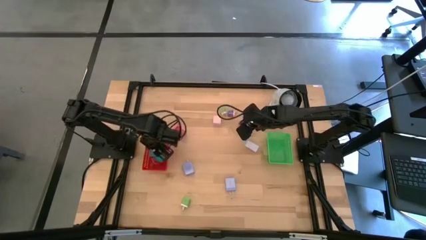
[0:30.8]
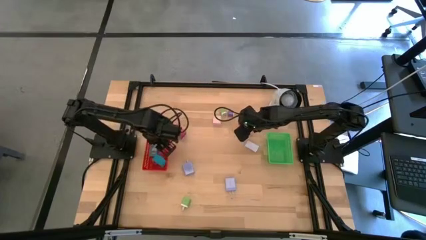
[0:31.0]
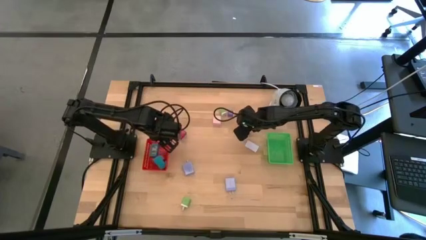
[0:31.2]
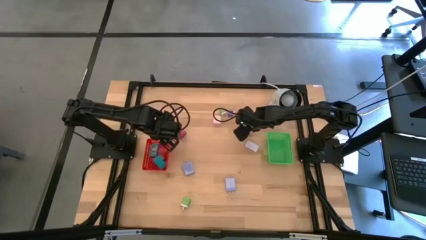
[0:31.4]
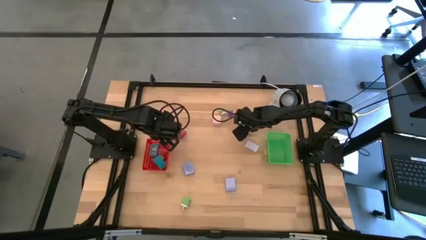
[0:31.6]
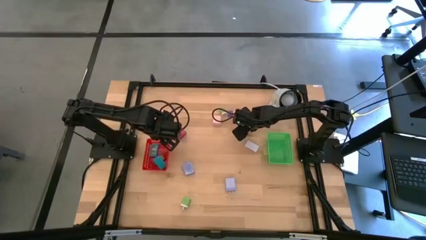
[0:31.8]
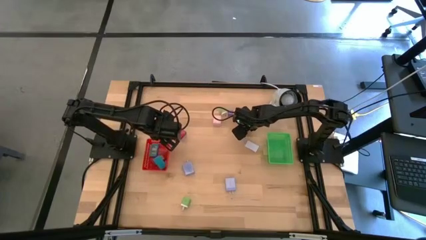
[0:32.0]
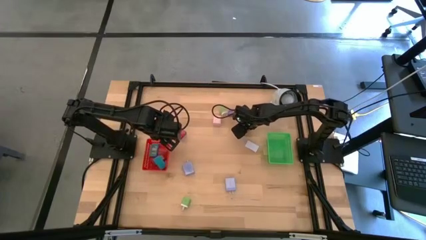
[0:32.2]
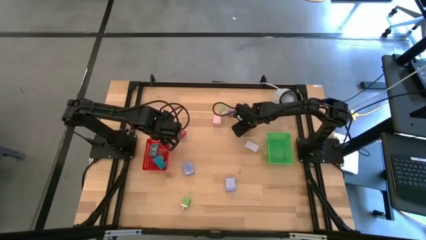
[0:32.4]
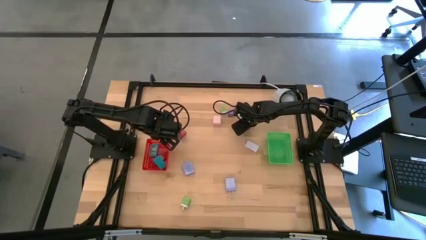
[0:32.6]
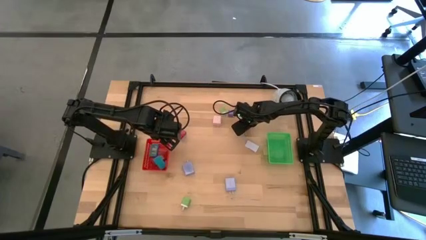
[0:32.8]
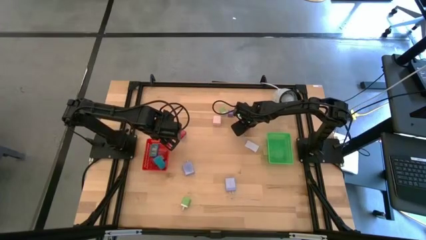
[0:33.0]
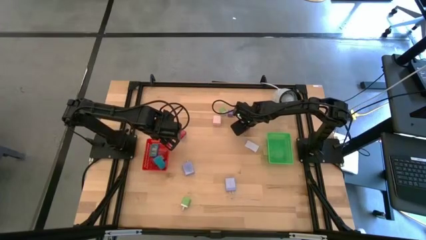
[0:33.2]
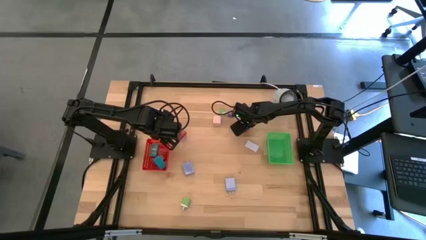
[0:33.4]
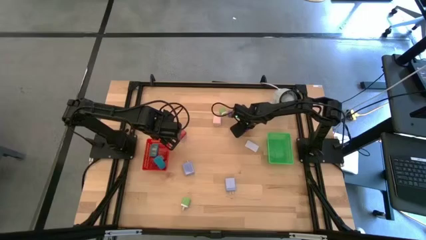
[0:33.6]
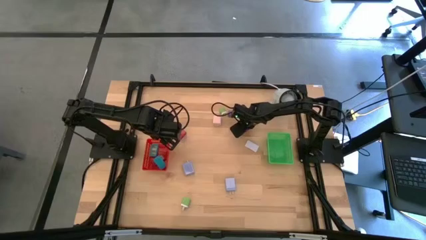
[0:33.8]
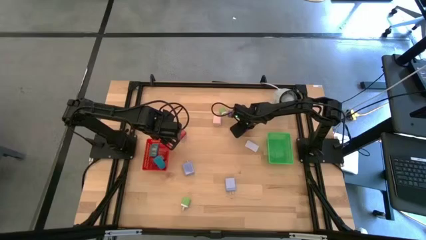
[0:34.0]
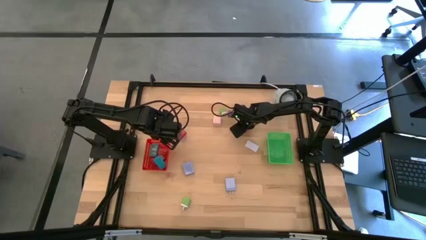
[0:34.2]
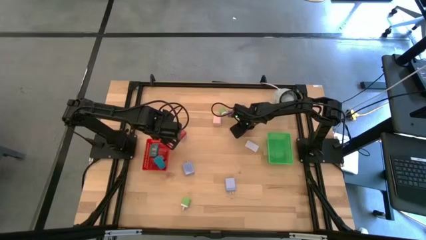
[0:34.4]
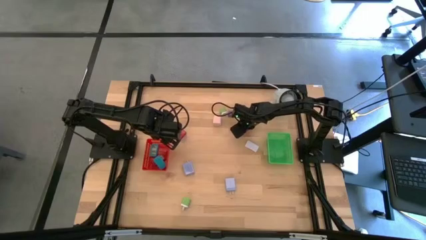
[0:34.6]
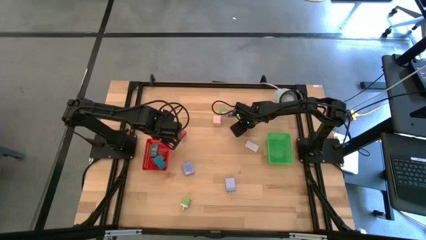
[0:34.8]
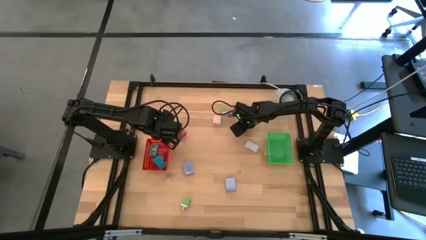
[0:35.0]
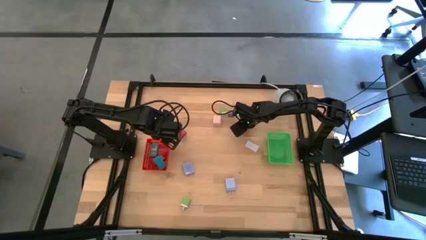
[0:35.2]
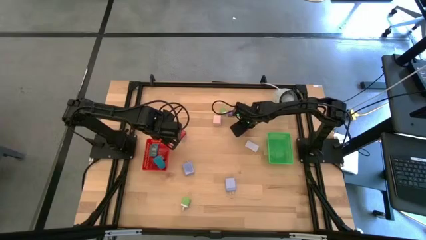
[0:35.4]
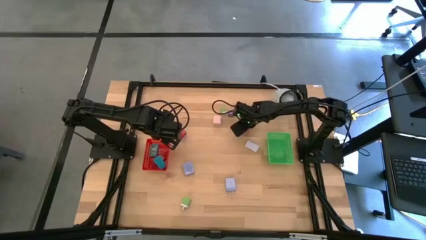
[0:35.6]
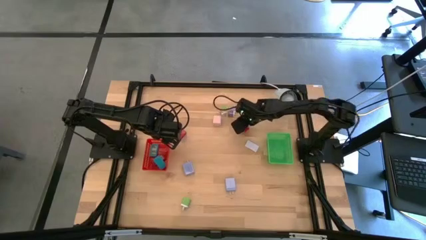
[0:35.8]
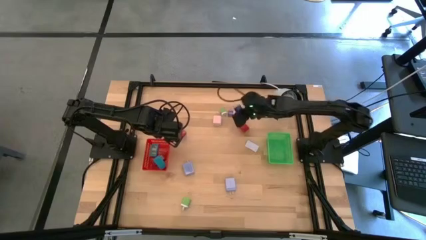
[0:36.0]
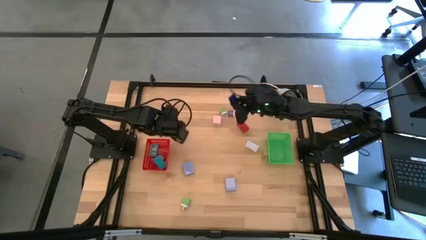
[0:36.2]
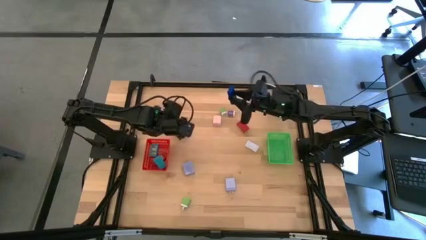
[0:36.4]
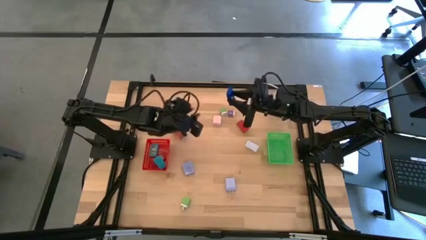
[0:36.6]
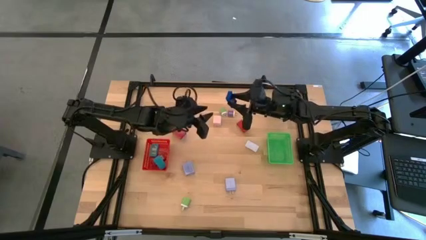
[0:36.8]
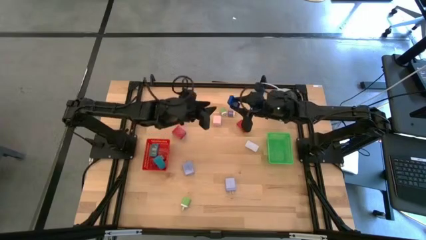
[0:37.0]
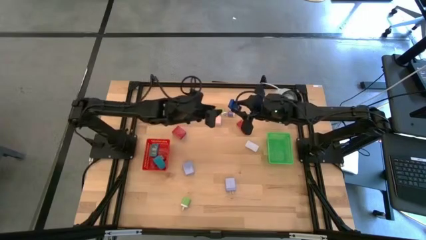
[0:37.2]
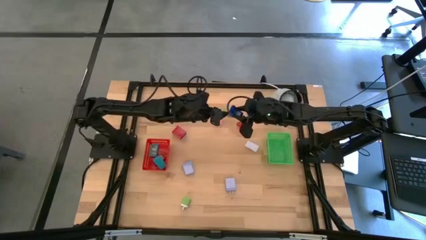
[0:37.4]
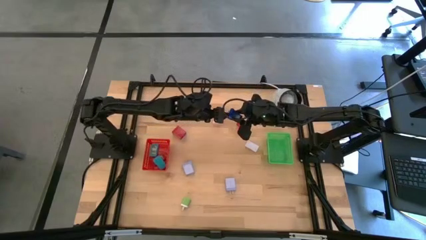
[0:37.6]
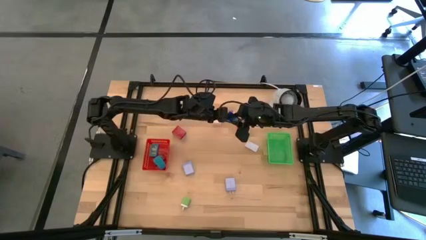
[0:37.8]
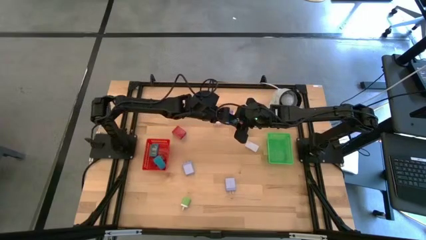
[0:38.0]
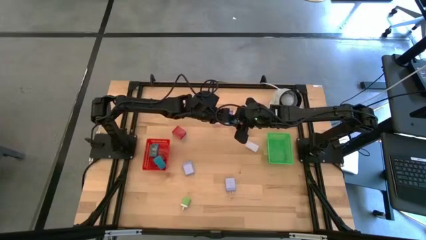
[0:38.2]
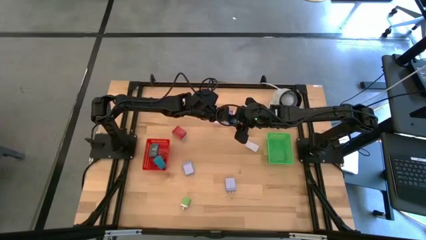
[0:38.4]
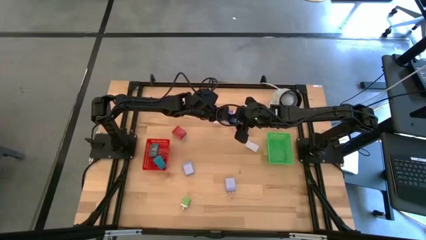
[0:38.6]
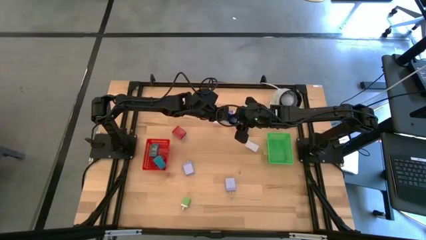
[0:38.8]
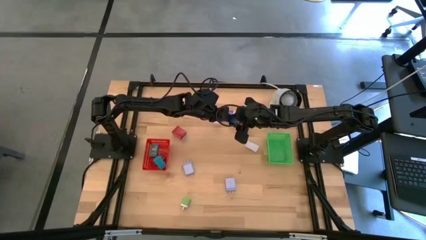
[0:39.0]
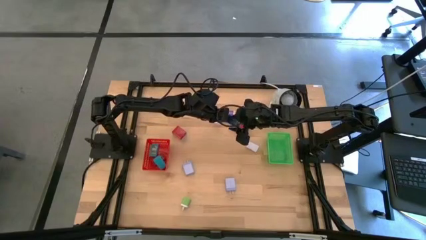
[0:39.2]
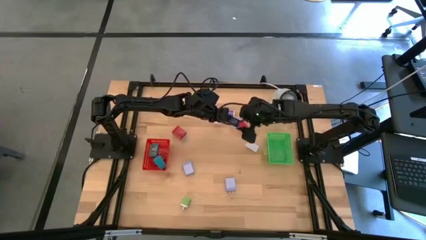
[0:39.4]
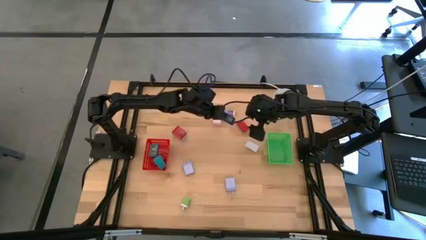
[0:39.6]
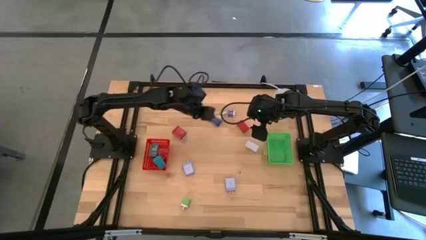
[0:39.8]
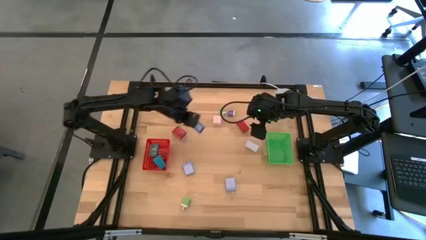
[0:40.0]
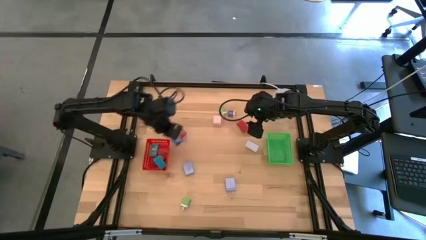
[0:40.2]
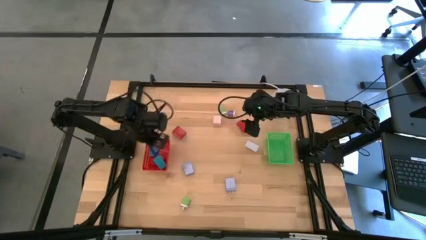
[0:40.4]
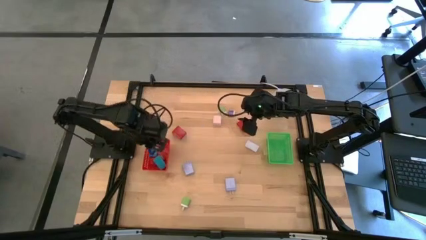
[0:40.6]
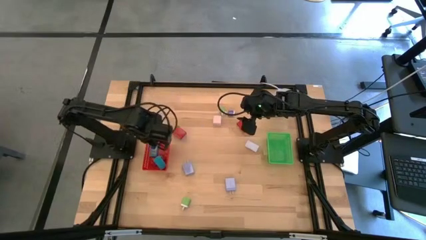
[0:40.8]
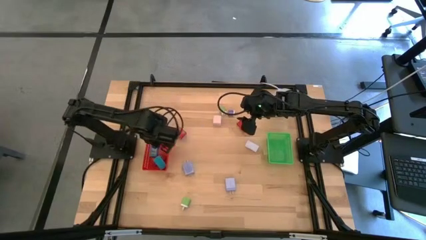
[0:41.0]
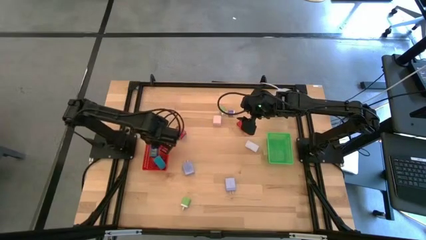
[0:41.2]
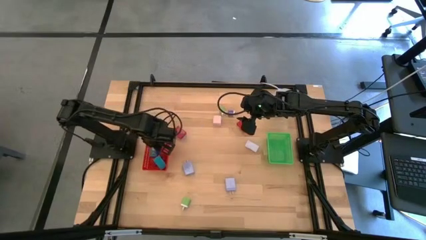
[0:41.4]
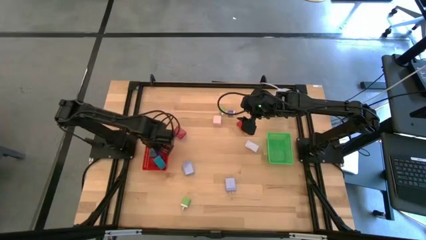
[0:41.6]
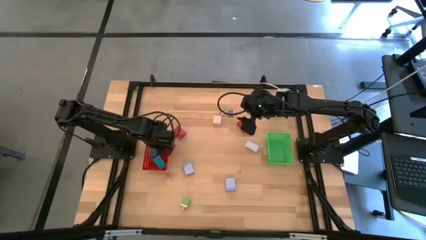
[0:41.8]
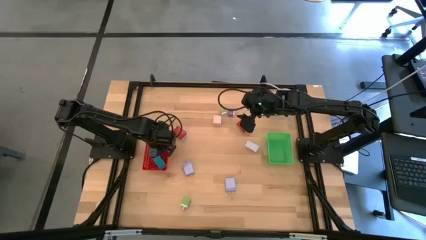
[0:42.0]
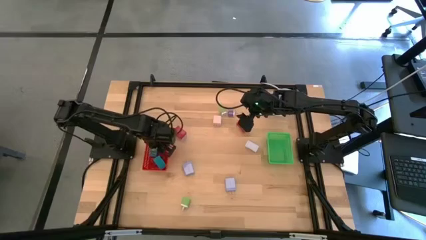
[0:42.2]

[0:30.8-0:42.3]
Task: Pick & Place Office items
Put the blue digital timer into the orange basket

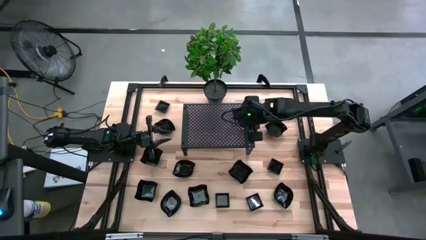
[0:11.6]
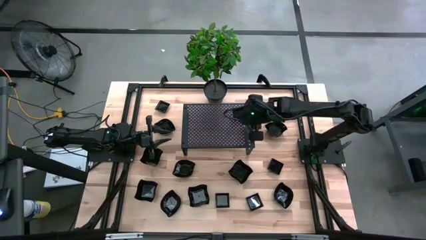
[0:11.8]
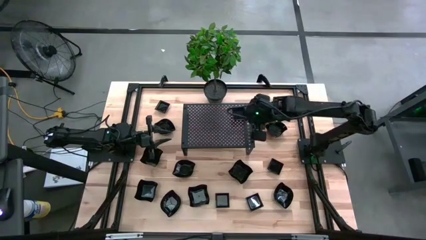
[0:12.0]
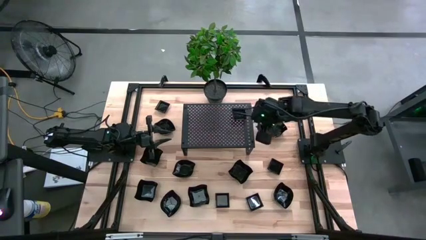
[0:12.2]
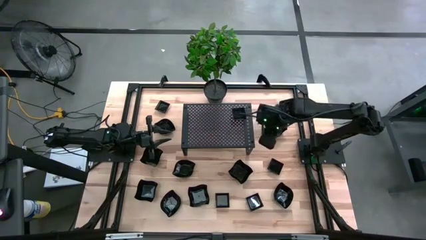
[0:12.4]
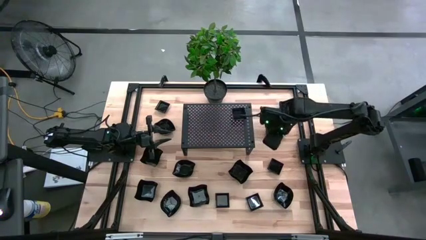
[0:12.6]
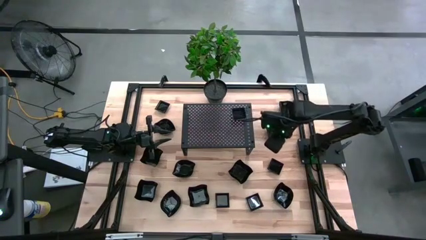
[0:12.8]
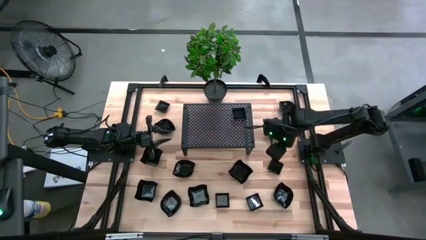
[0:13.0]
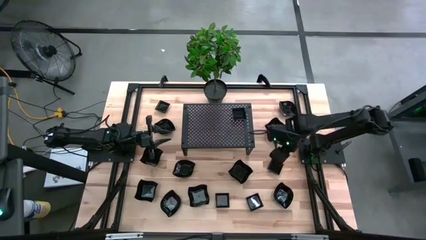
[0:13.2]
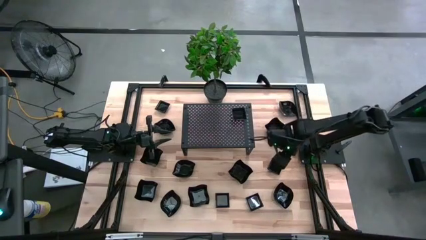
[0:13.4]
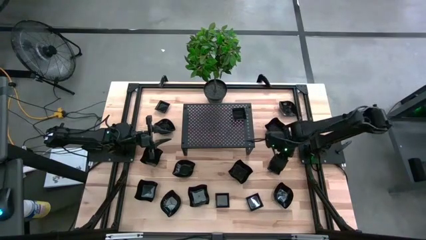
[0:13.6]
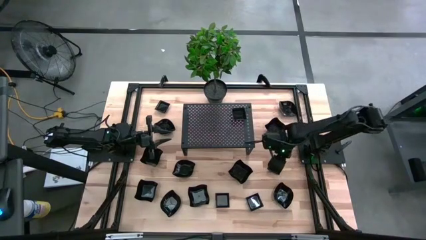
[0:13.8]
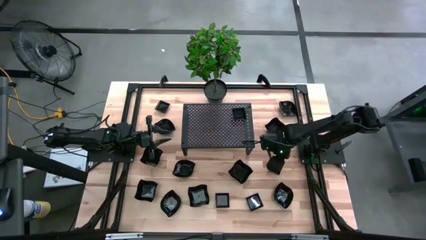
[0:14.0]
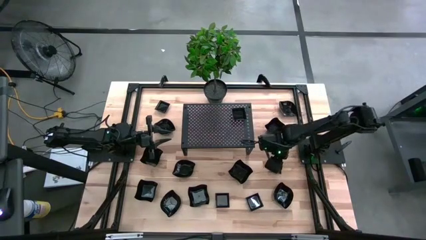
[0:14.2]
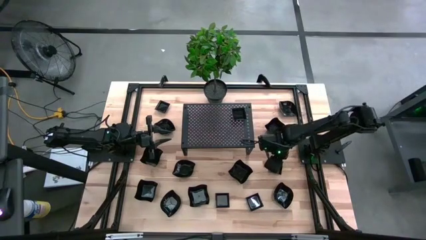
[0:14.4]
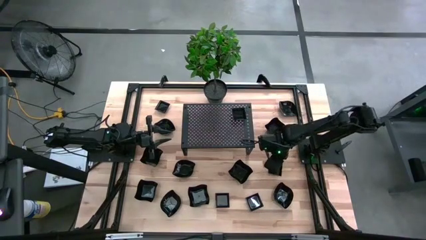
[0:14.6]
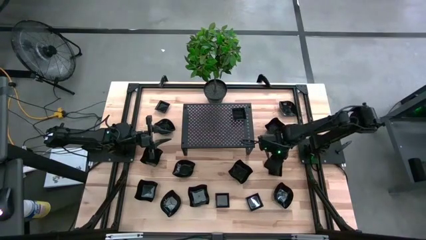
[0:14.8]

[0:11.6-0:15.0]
Task: Pick & Place Mini shaped plates
Stack the black square plate on top of the other black square plate on the shelf
